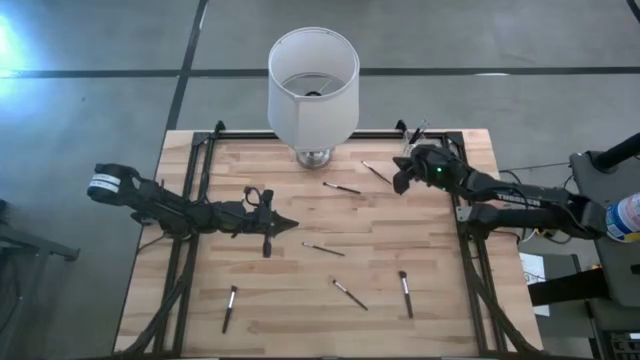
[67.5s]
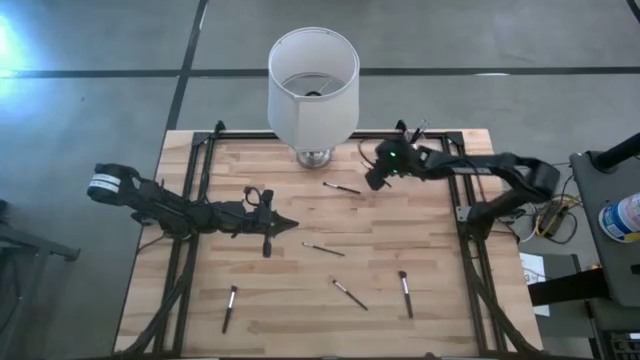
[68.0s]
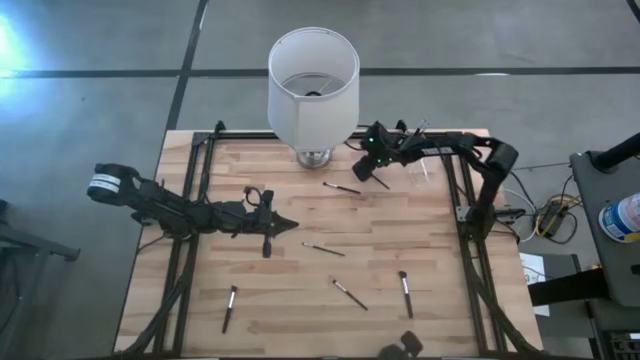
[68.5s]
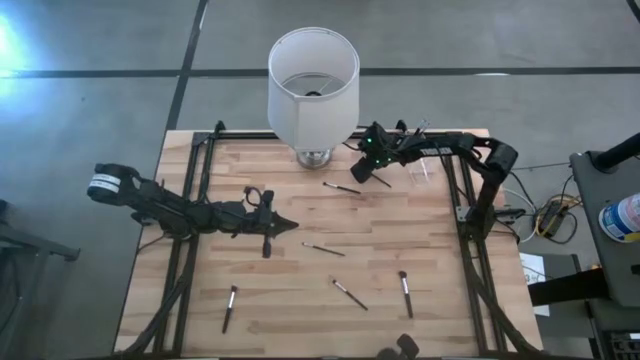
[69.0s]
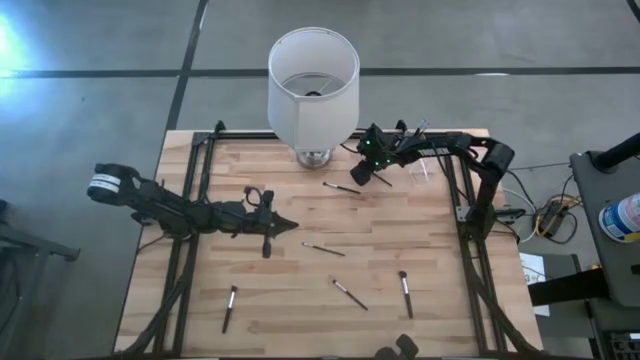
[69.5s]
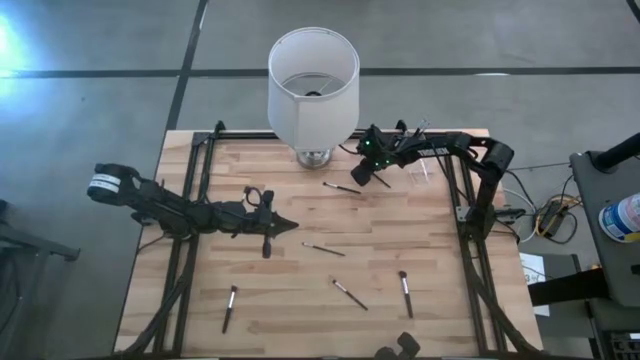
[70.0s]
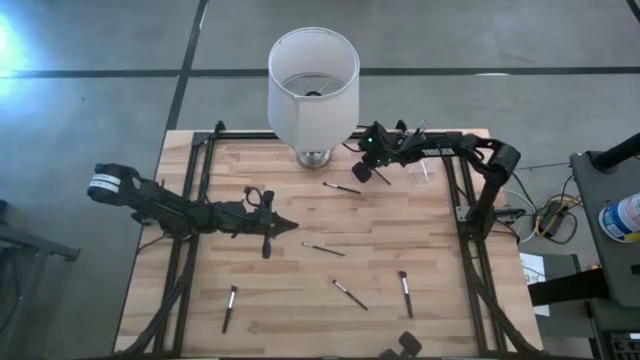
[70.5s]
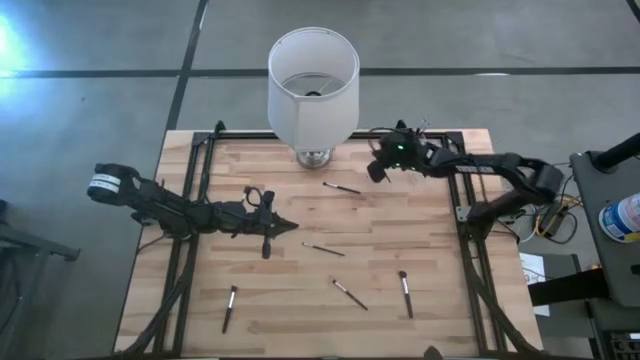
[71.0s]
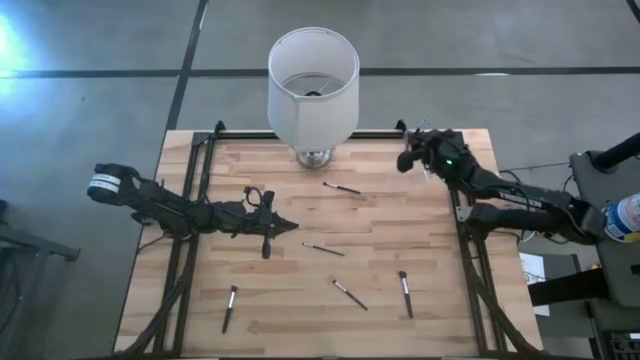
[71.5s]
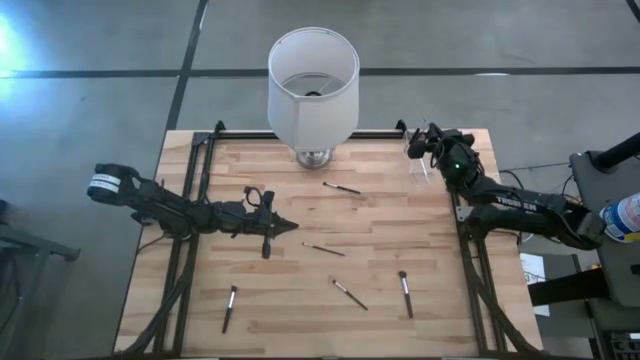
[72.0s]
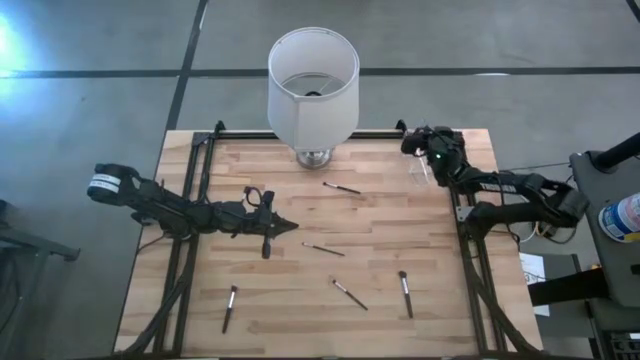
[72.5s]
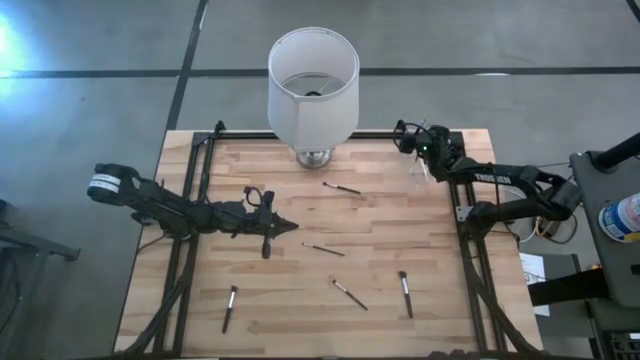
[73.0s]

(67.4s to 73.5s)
Task: Put items in baskets/containers
Put the eyeshadow brush into the transparent organizer

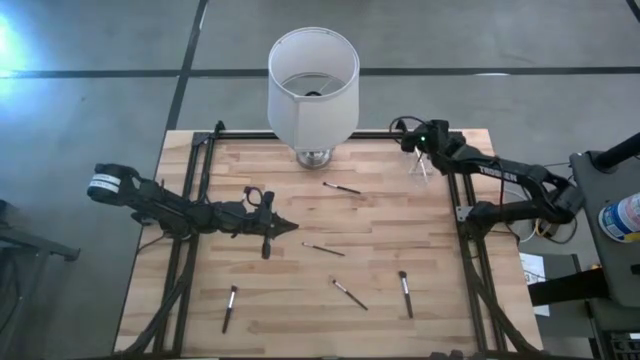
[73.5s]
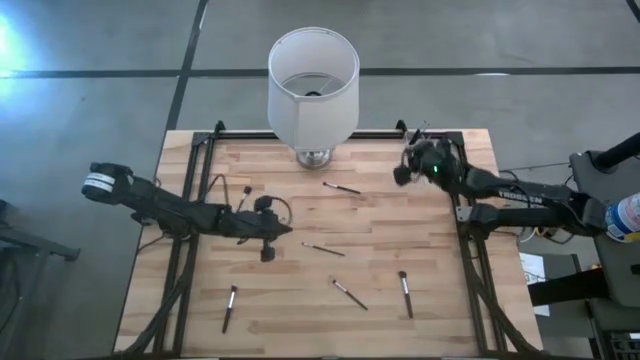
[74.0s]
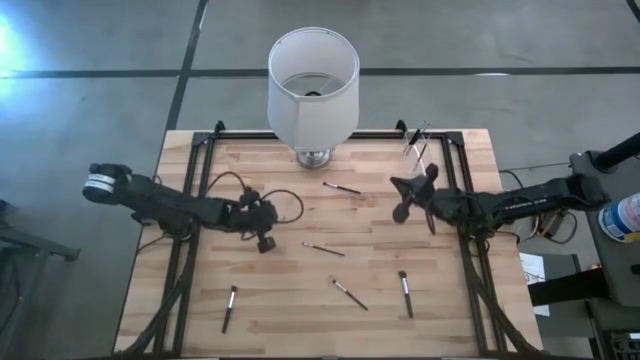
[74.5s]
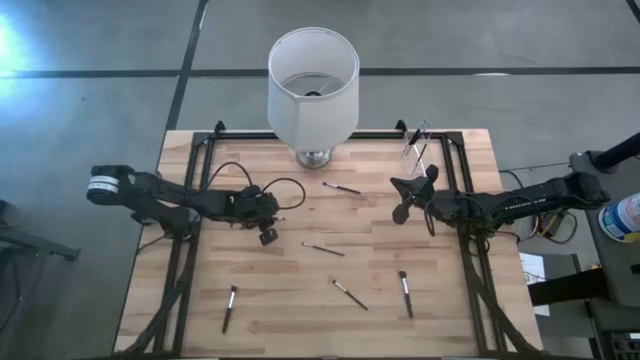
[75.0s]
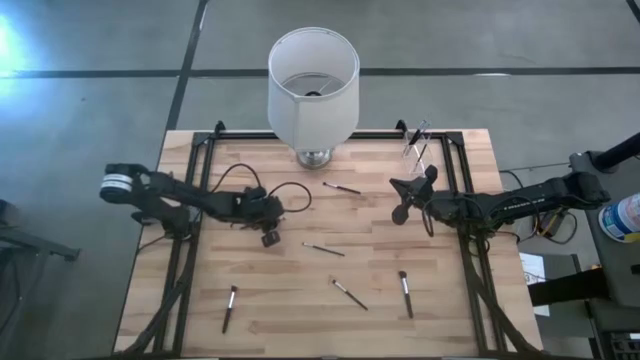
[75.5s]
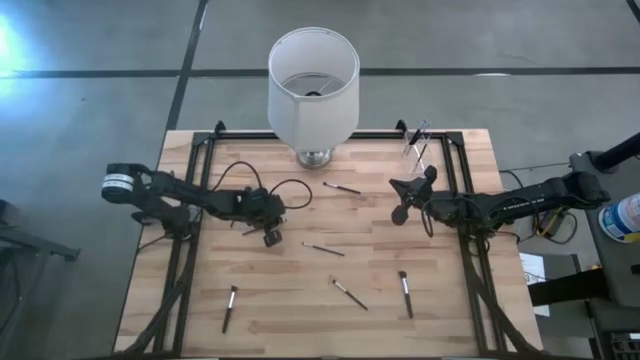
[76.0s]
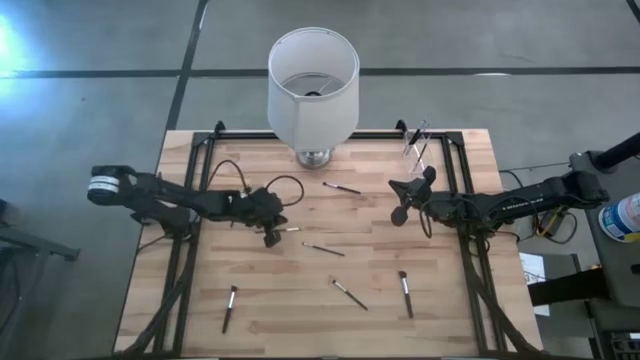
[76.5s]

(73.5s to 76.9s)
Put the eyeshadow brush into the transparent organizer

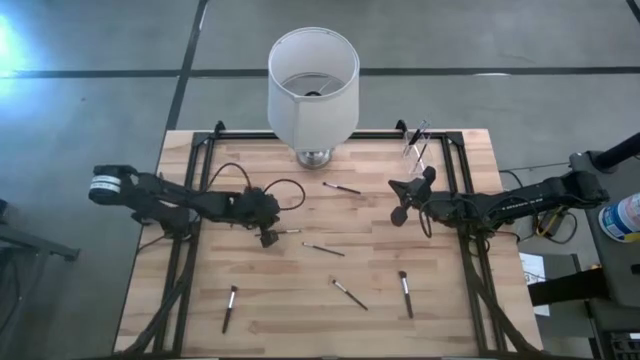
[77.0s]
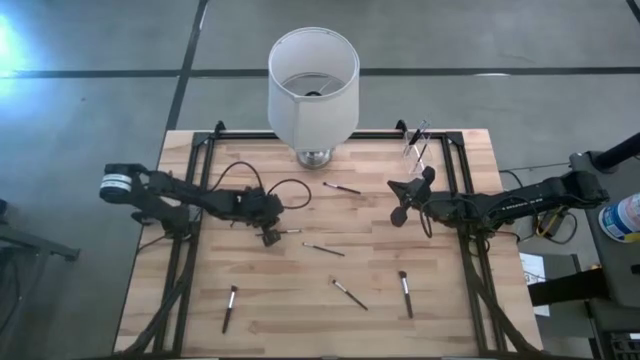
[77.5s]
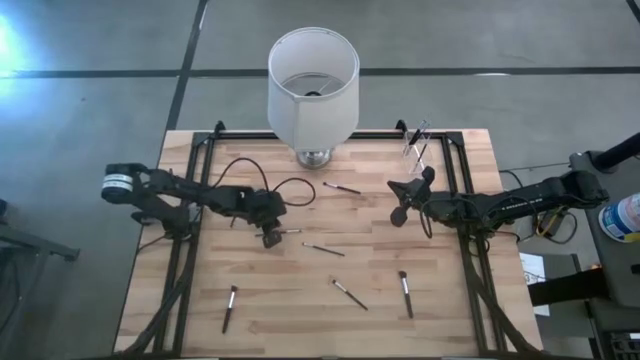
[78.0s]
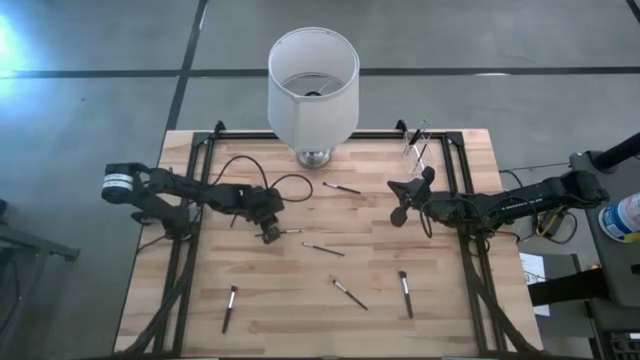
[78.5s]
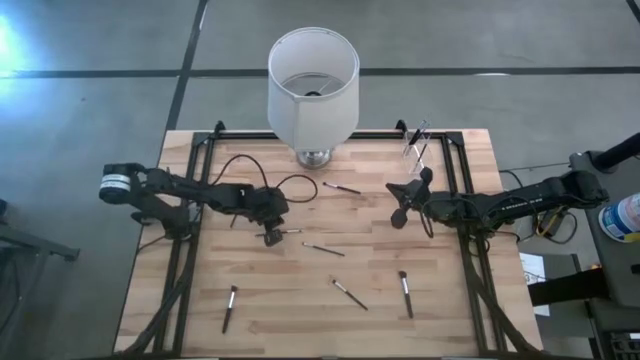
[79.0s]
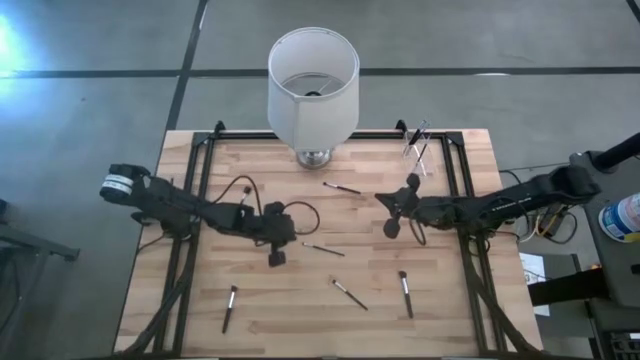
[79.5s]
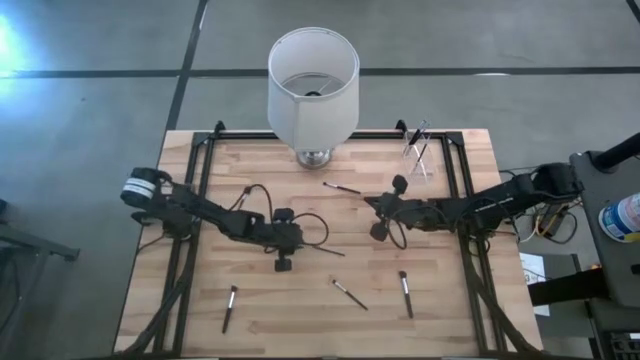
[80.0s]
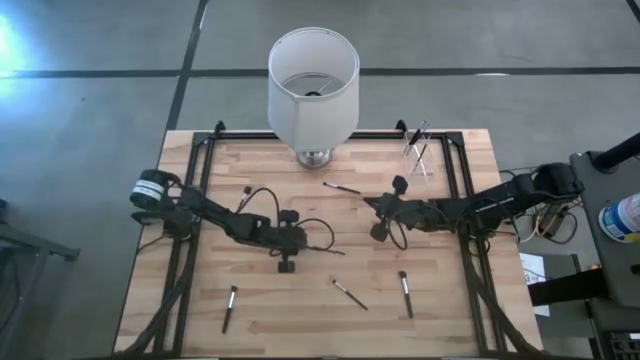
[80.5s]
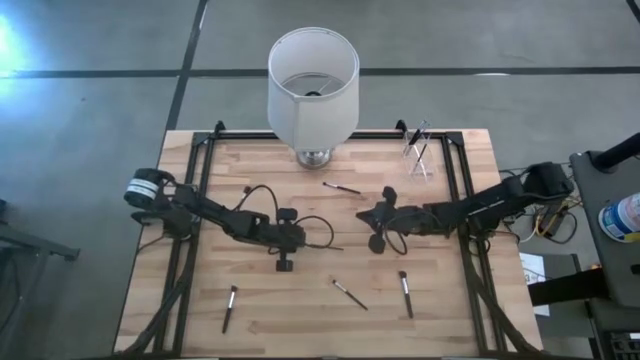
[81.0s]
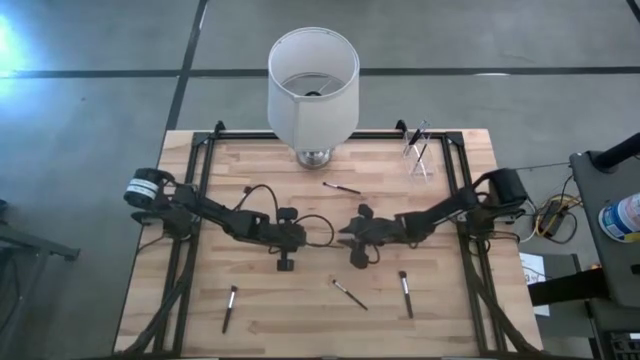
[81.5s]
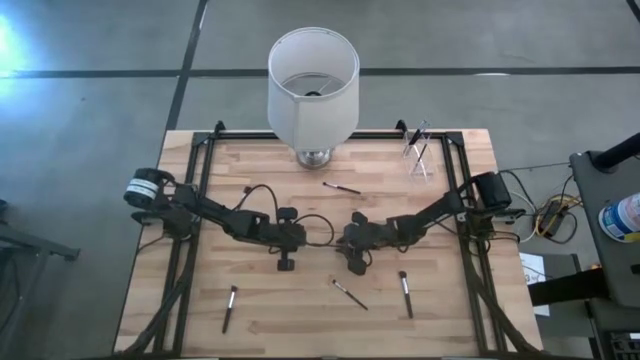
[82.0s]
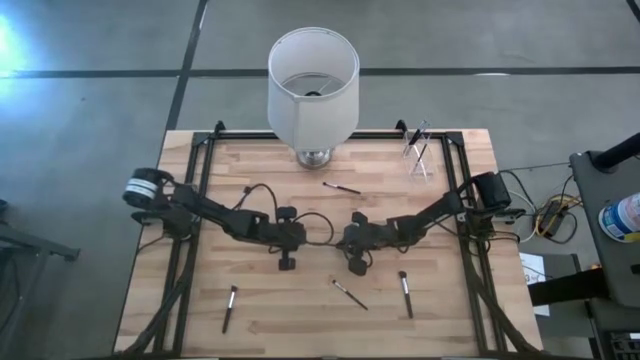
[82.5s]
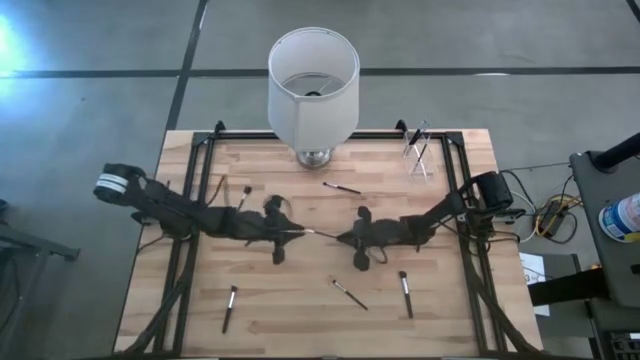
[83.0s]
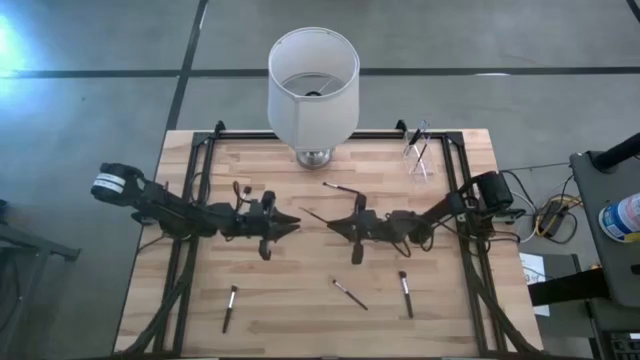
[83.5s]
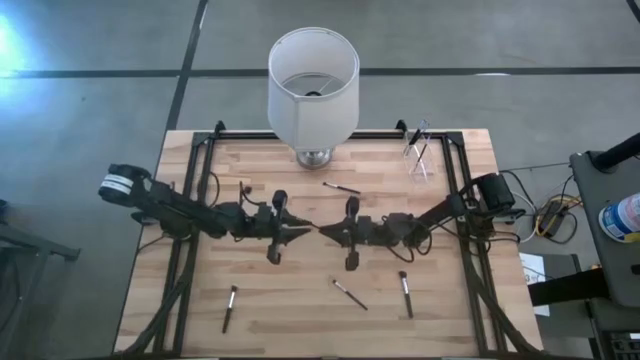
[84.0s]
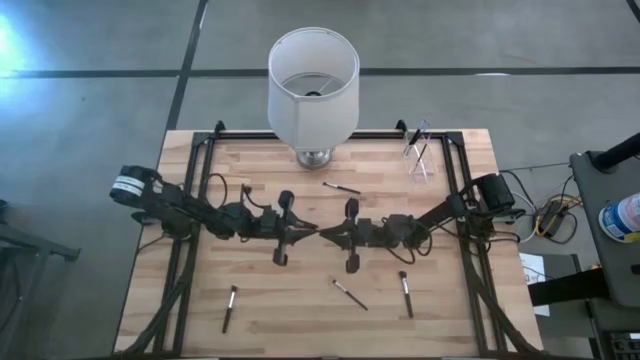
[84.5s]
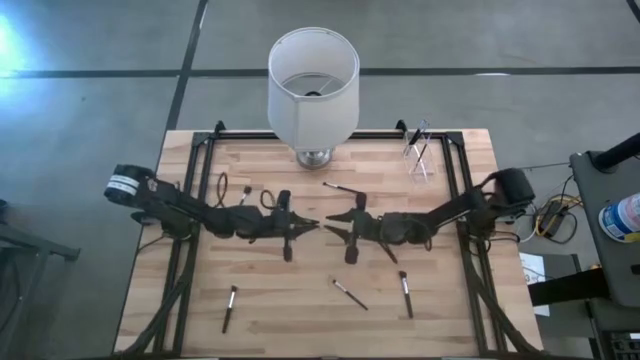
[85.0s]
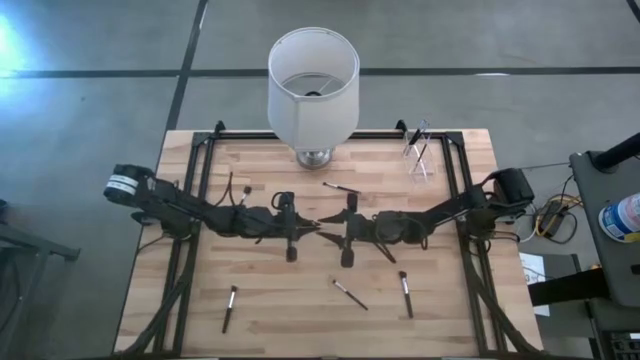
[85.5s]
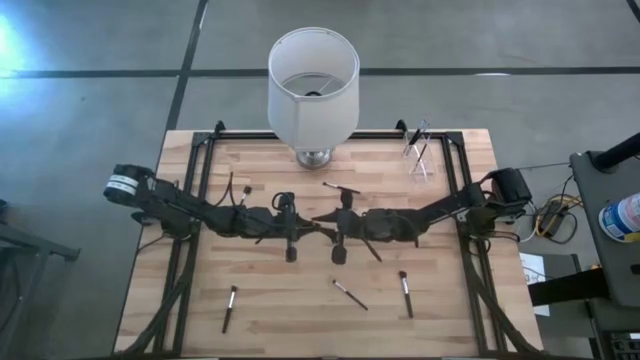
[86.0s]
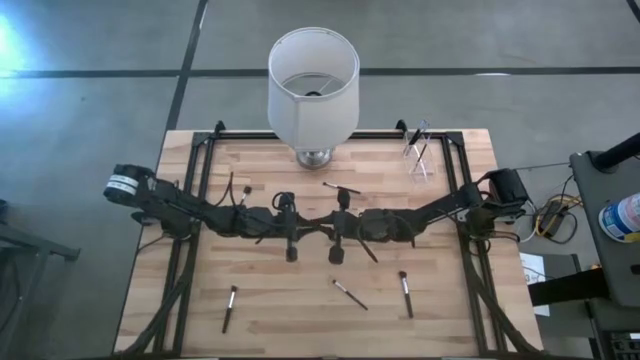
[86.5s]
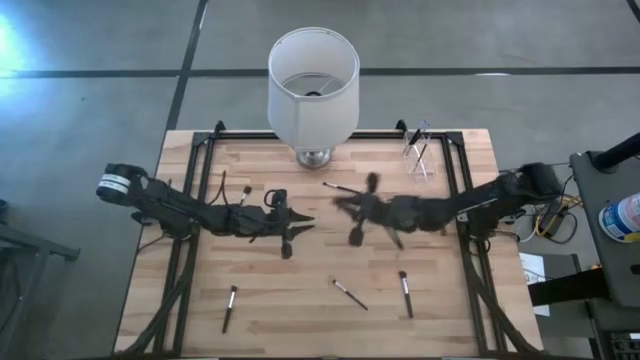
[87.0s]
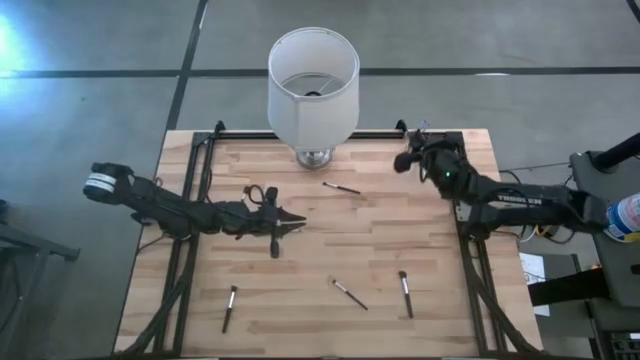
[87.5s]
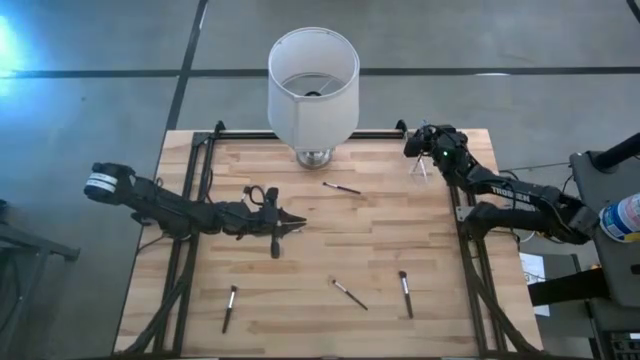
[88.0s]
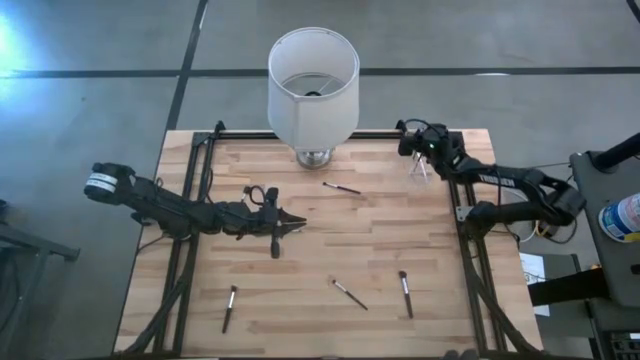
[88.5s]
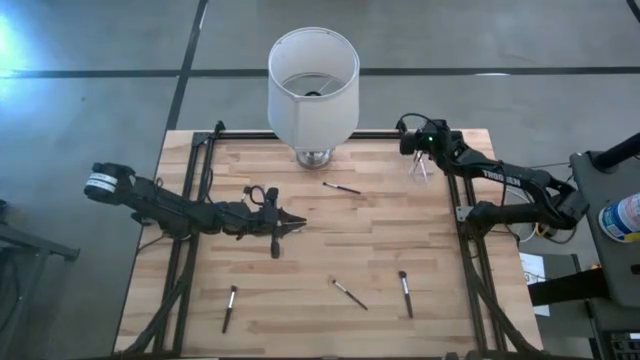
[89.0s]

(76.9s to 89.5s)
Put the eyeshadow brush into the transparent organizer
